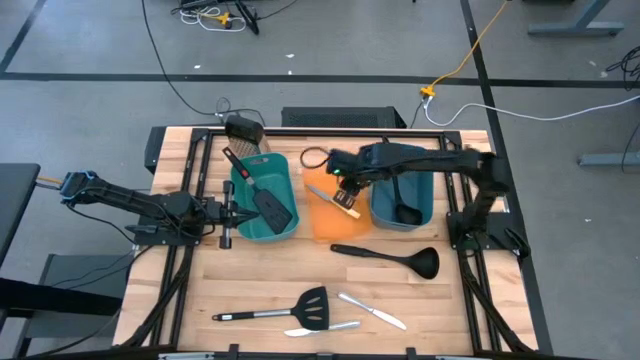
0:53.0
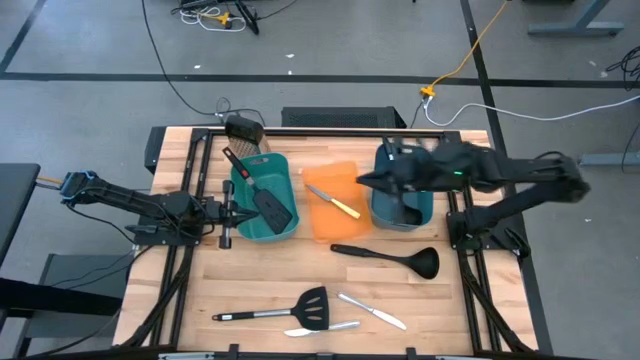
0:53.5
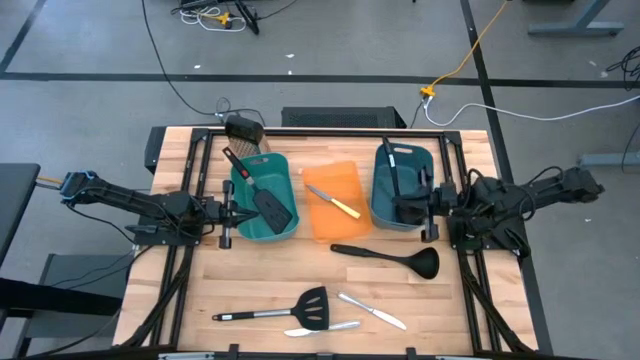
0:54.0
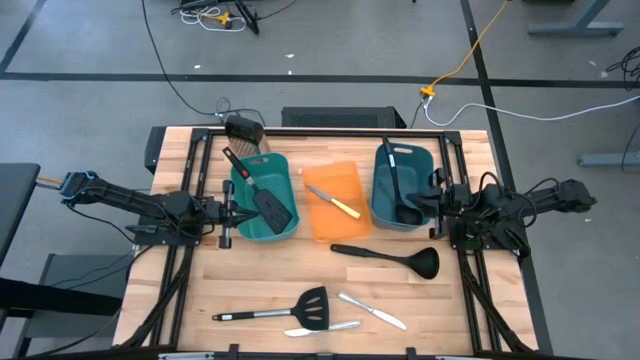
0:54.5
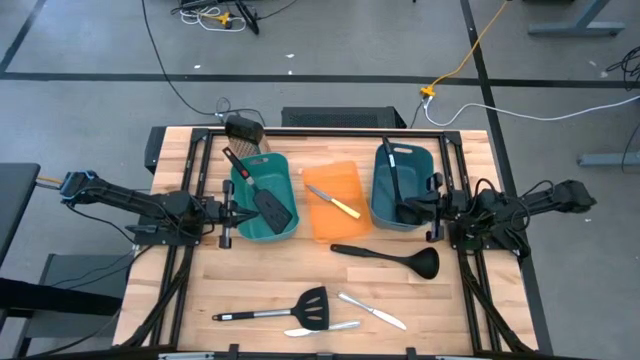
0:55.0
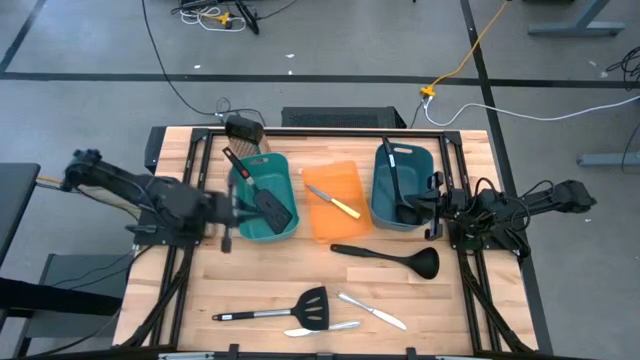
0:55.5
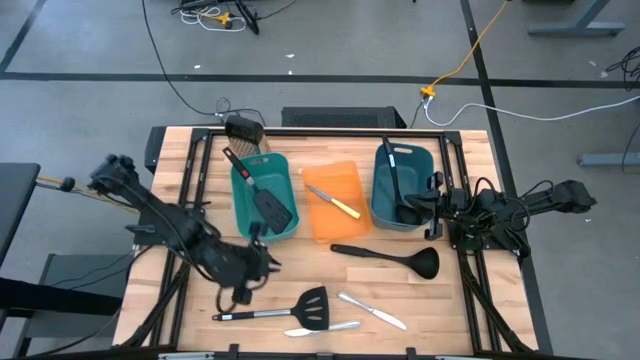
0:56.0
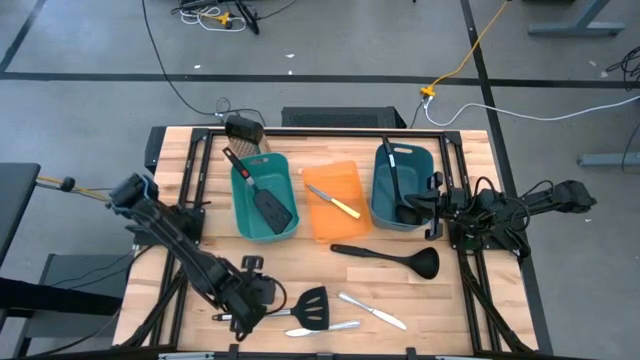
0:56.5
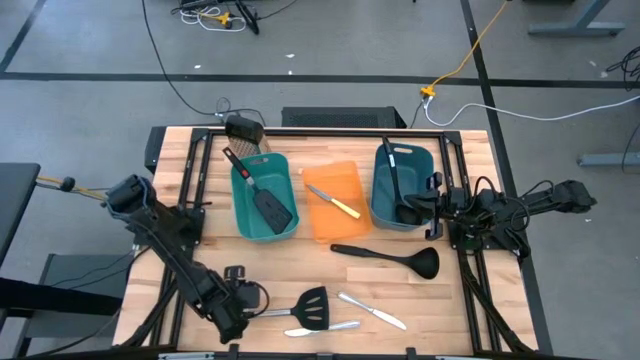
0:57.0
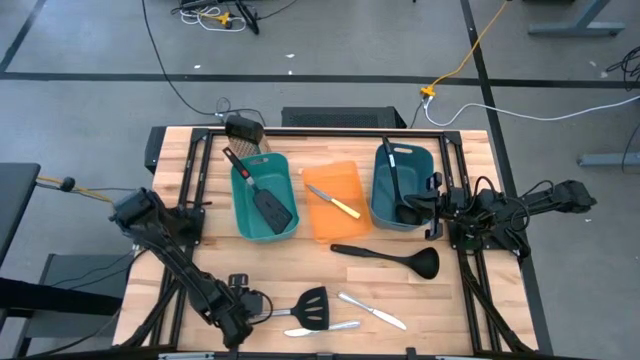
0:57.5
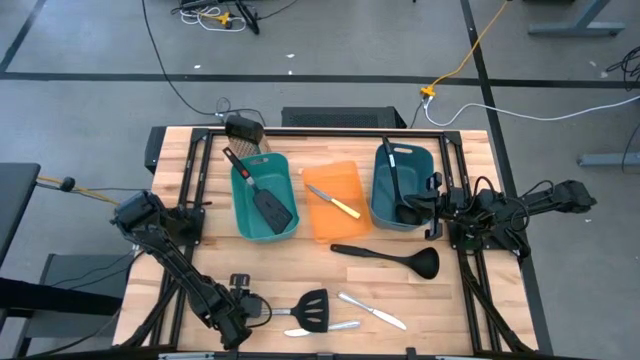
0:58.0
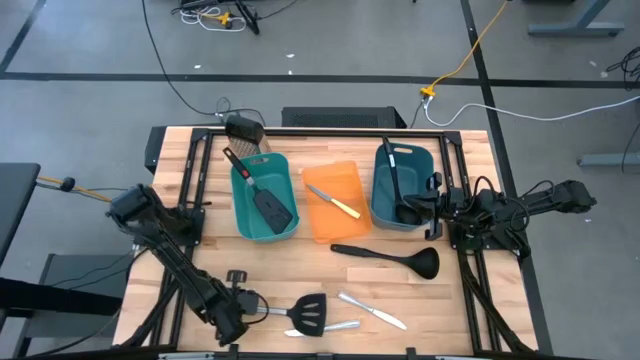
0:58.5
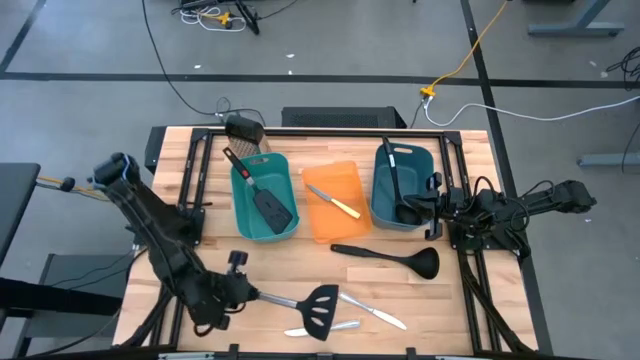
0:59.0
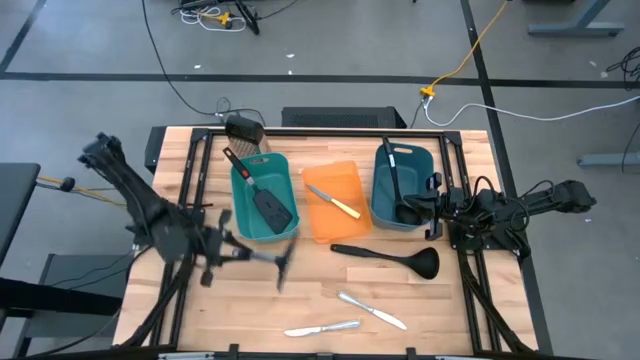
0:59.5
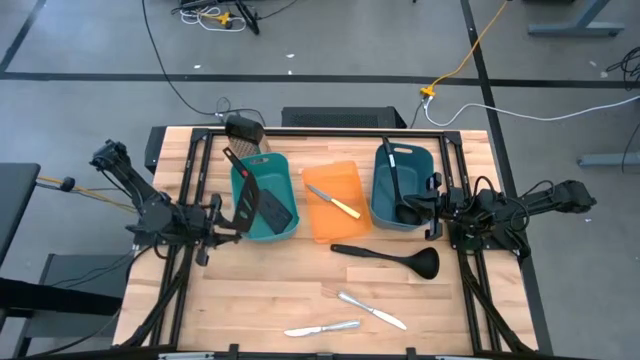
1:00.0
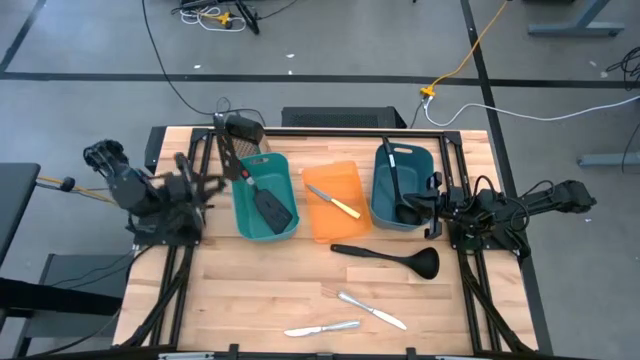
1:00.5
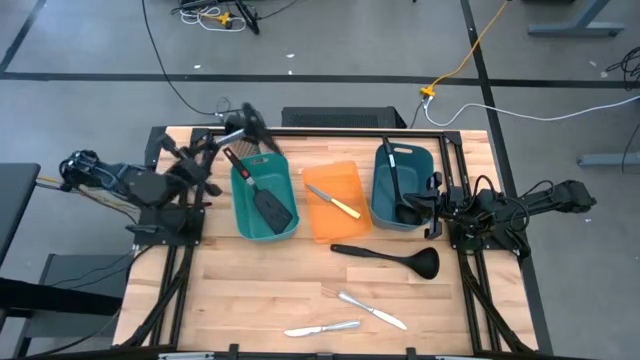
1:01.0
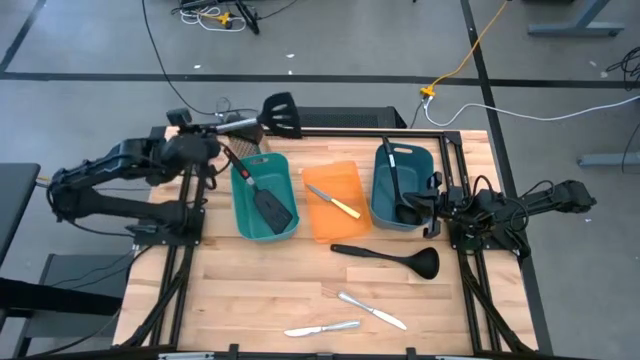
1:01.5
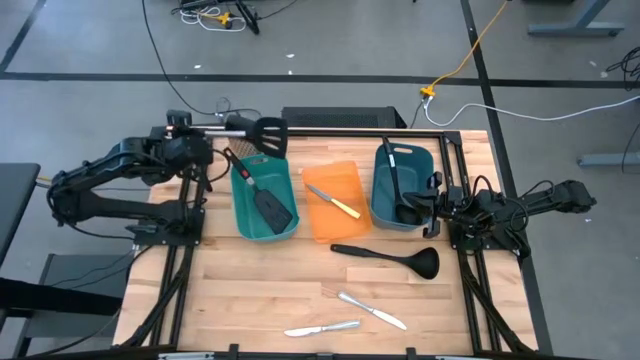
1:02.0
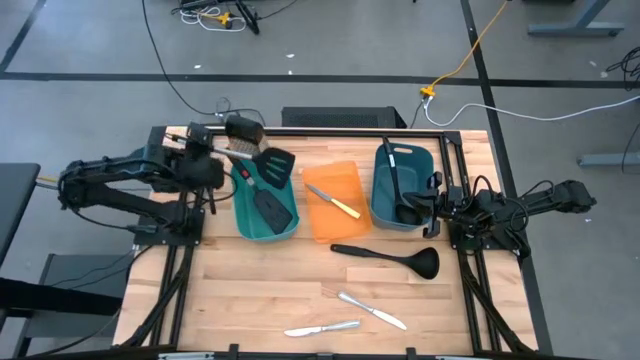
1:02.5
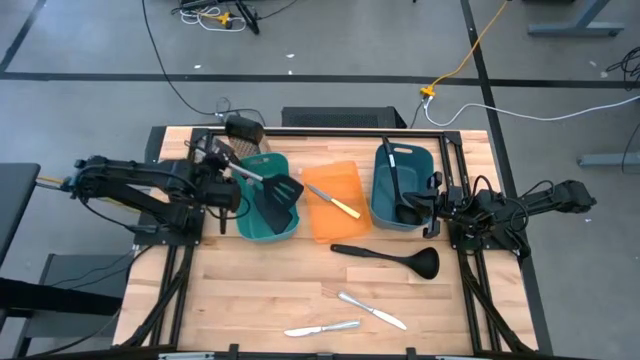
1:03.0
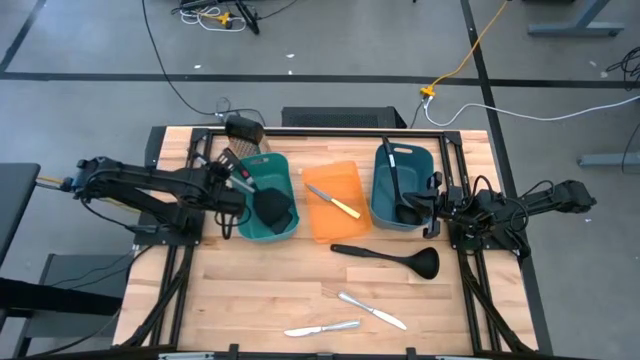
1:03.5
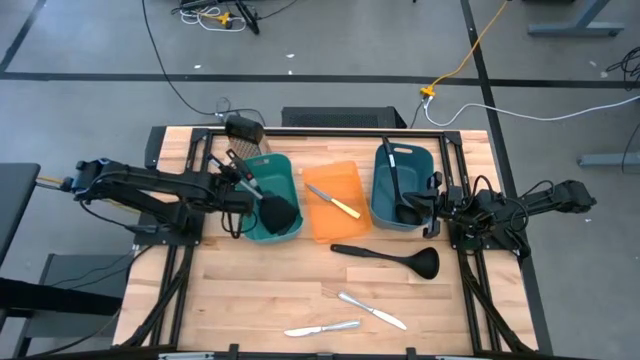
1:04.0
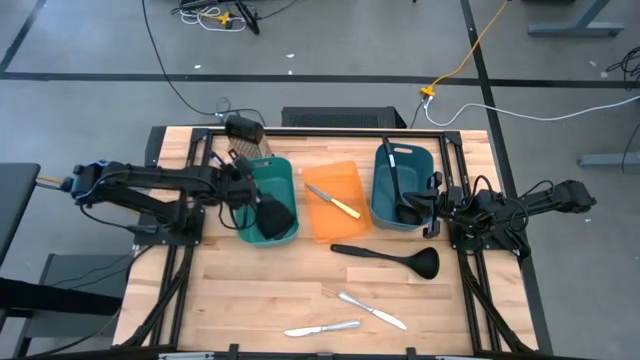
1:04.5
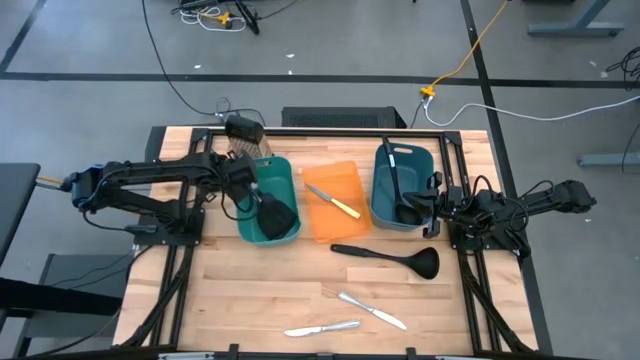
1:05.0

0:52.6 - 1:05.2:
Task: Pick & Place Kitchen Items
Put the black spatula into the green bin

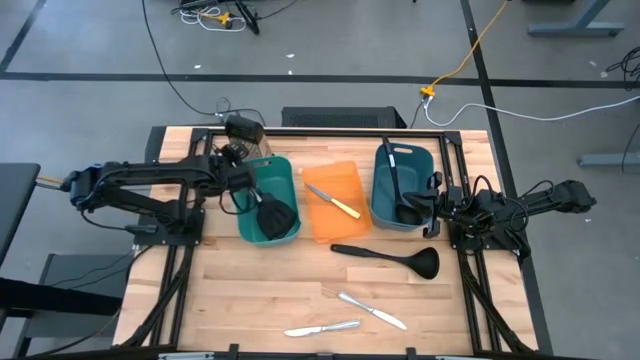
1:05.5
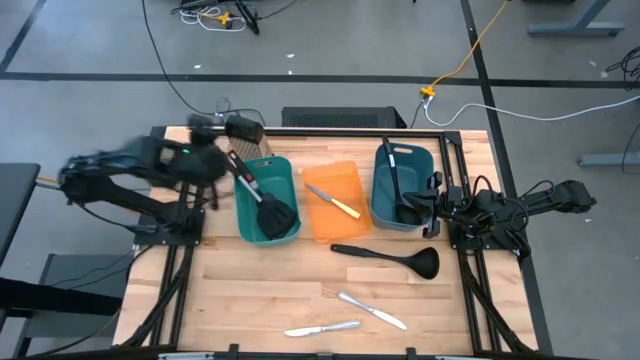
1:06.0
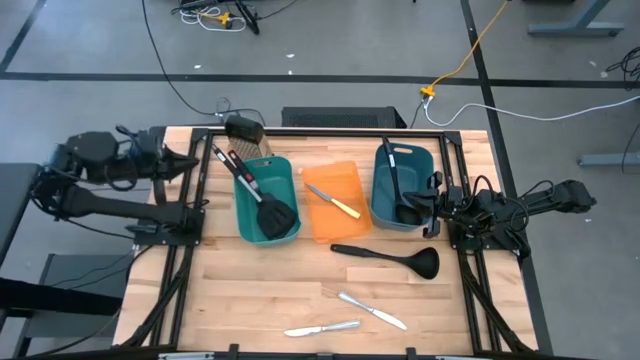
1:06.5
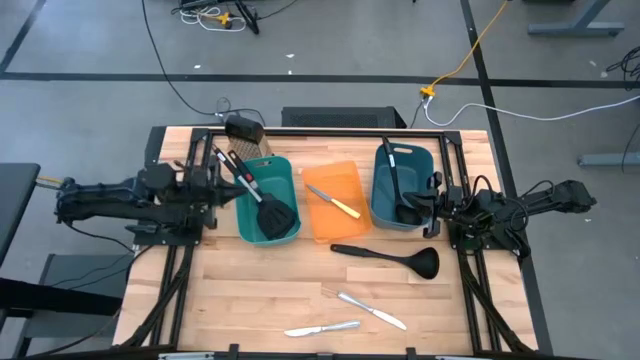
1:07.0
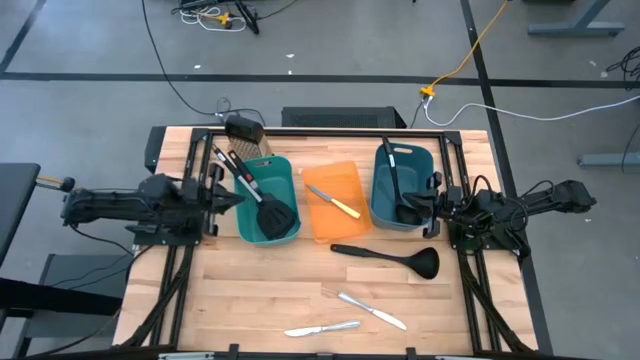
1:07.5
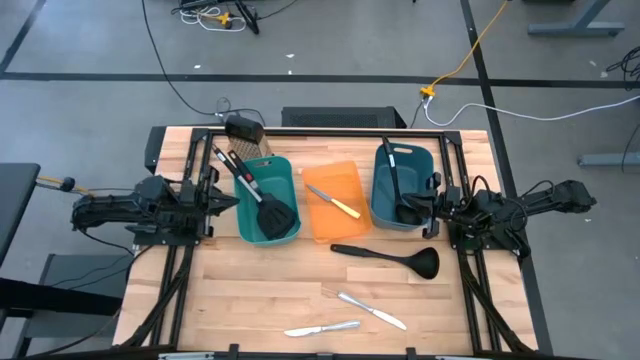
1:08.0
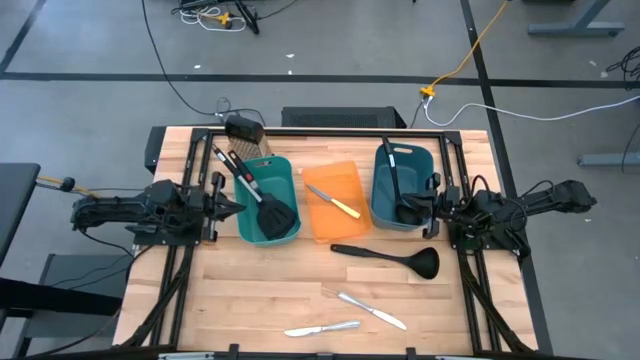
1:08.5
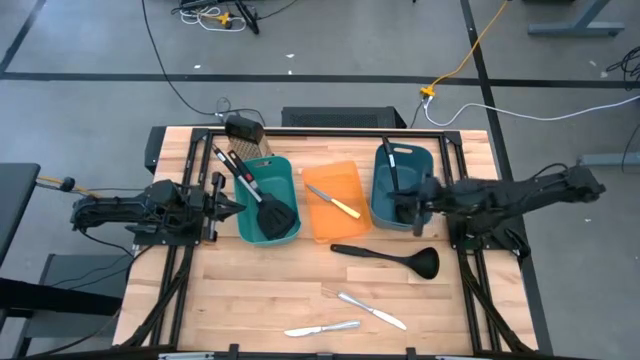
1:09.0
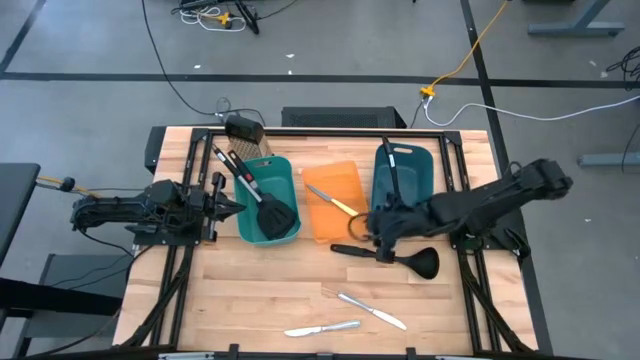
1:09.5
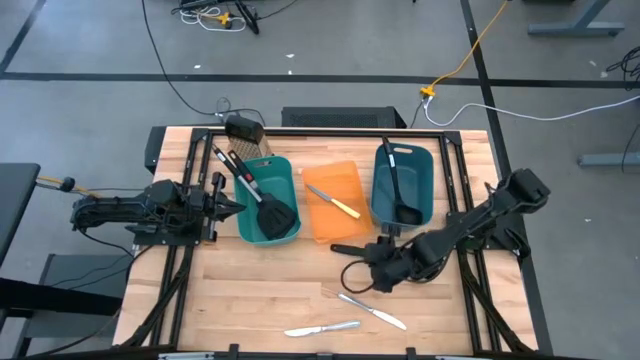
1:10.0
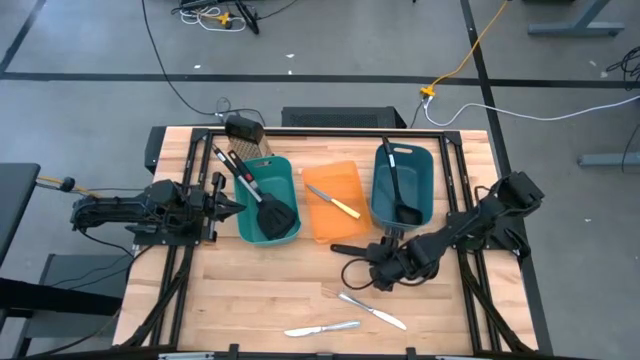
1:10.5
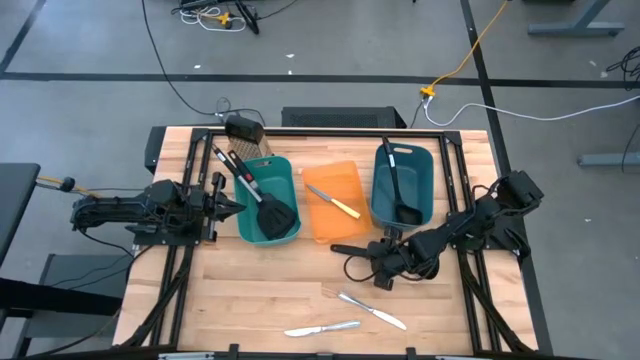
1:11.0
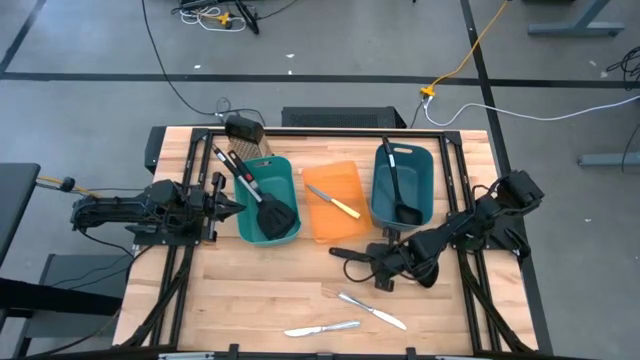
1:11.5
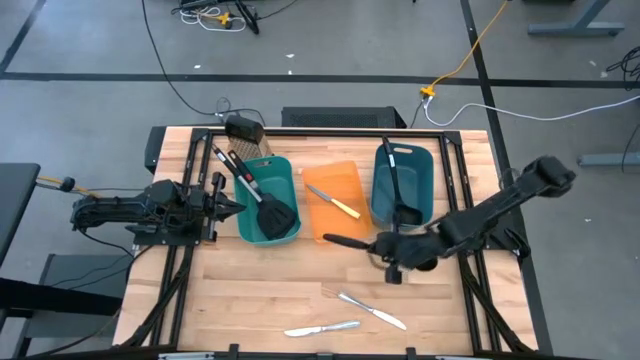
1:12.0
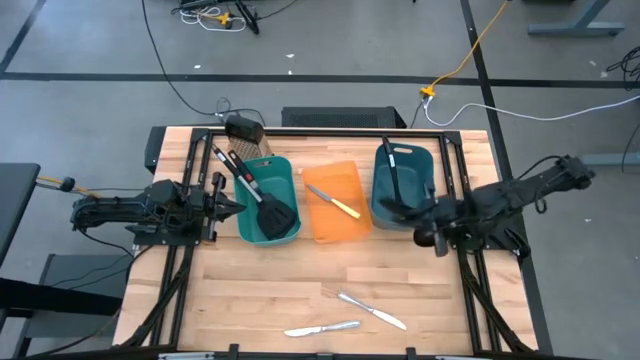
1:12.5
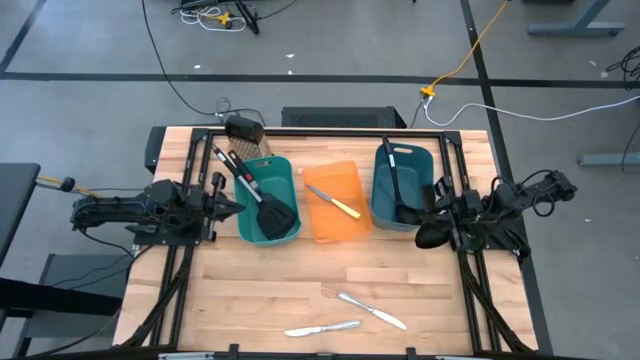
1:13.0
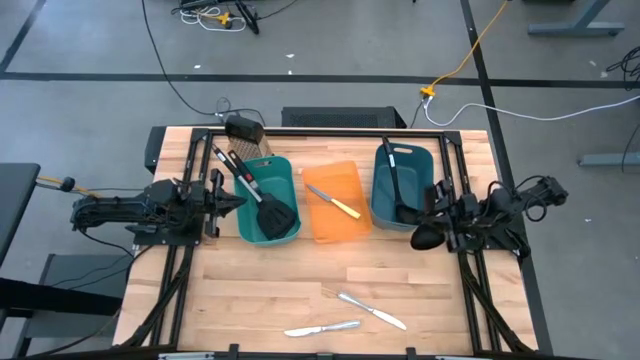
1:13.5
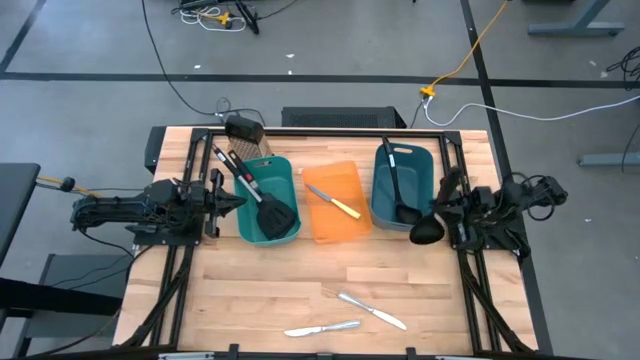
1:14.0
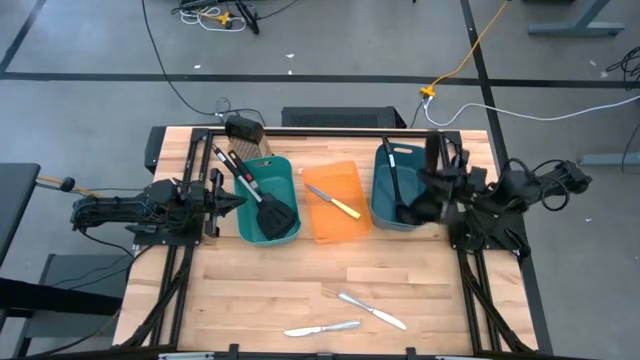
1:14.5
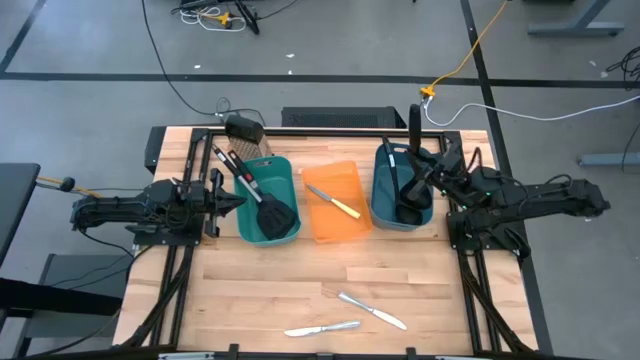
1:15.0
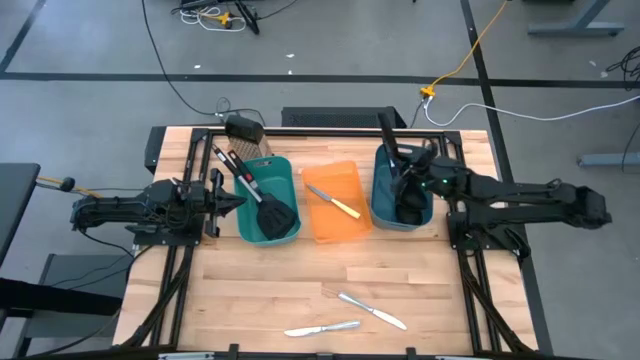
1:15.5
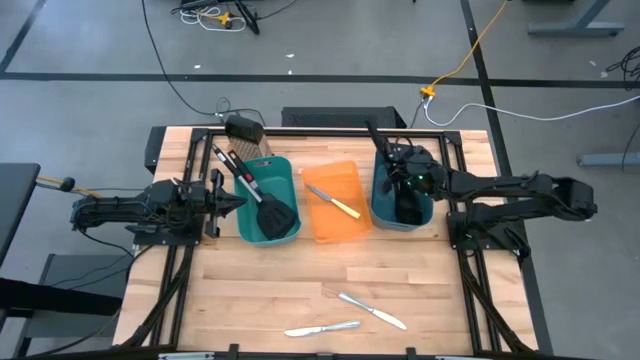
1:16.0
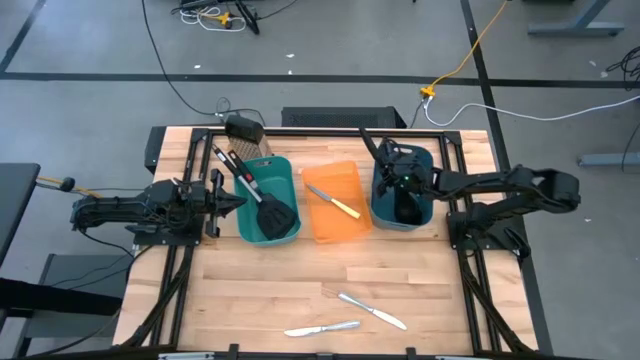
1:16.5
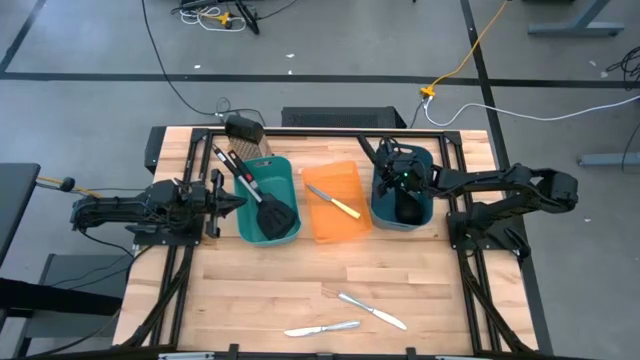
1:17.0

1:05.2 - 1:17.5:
Put the black serving spoon into the blue bin
